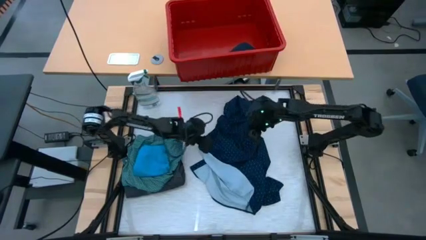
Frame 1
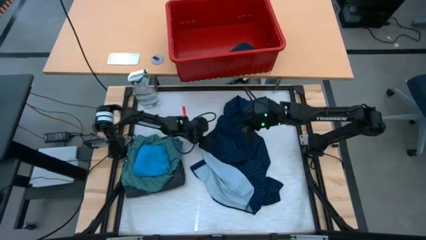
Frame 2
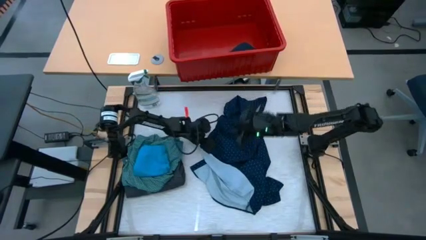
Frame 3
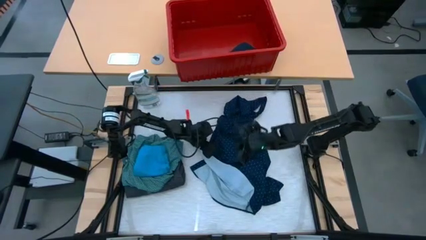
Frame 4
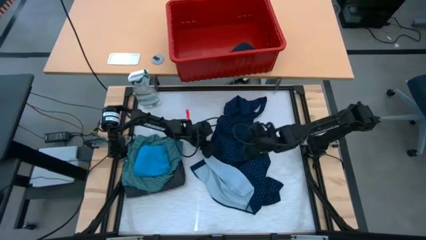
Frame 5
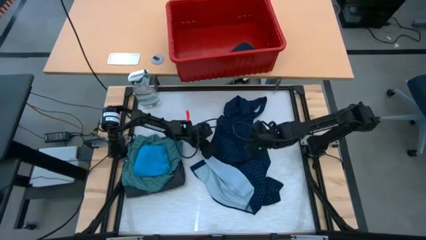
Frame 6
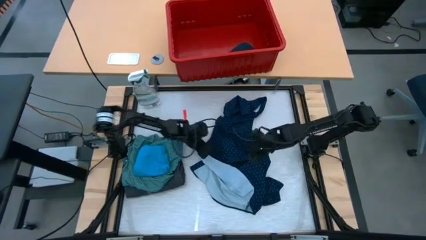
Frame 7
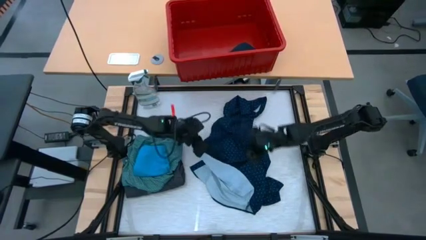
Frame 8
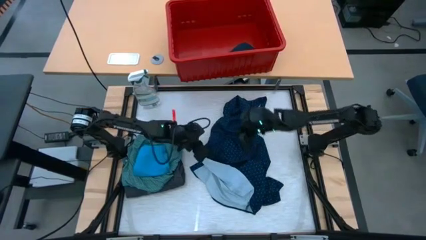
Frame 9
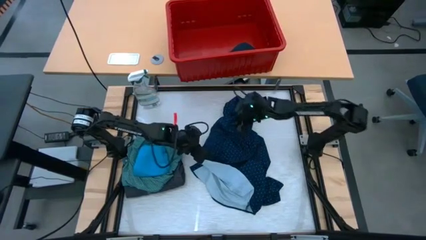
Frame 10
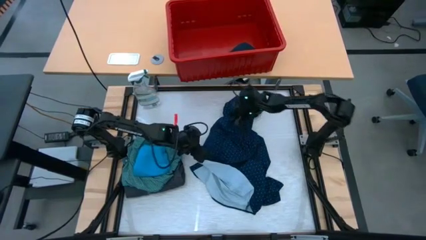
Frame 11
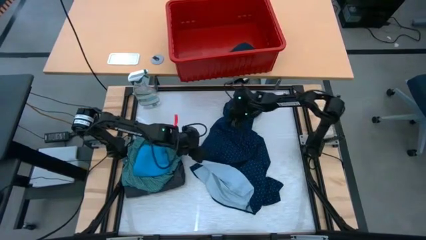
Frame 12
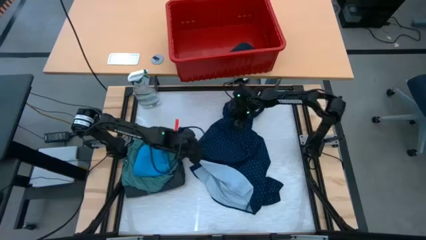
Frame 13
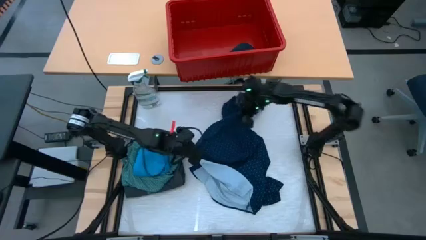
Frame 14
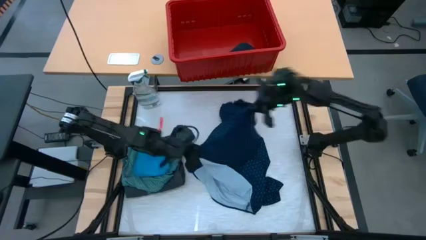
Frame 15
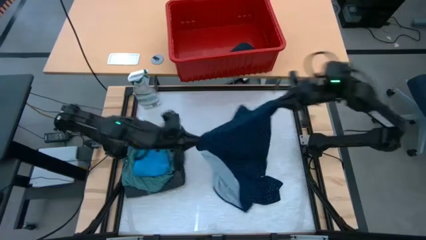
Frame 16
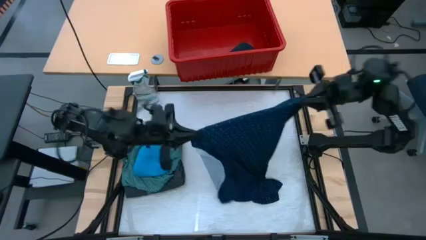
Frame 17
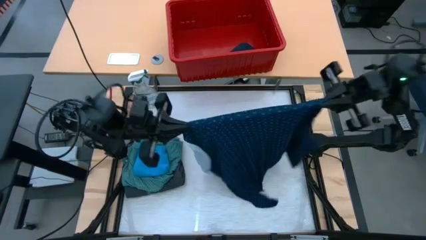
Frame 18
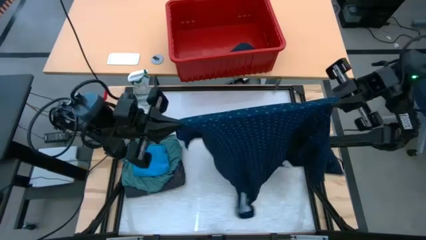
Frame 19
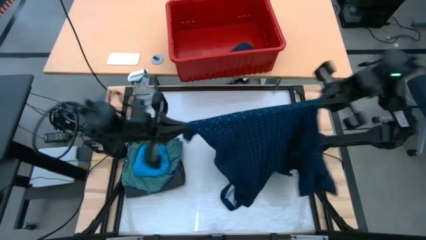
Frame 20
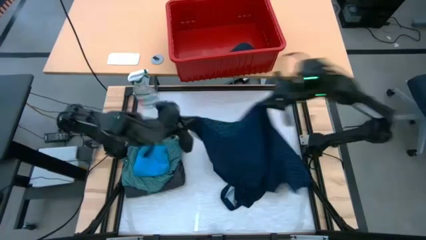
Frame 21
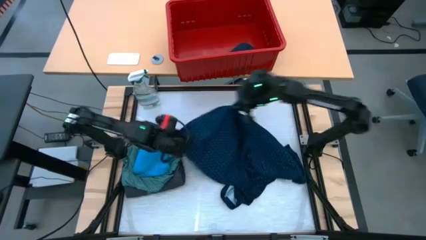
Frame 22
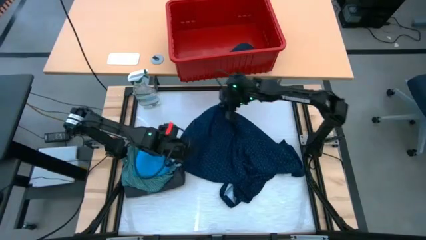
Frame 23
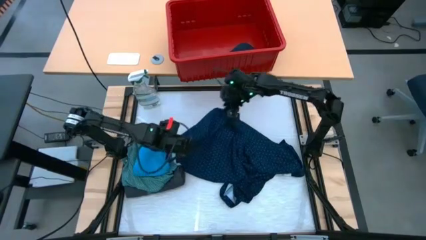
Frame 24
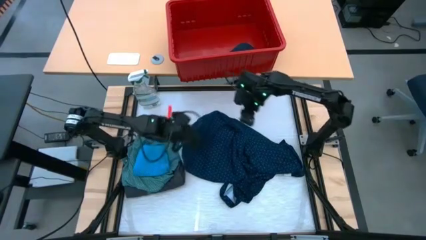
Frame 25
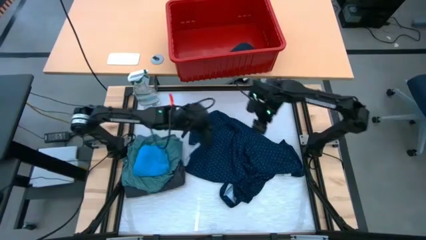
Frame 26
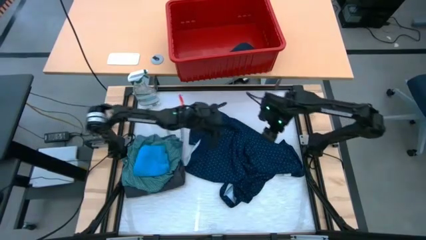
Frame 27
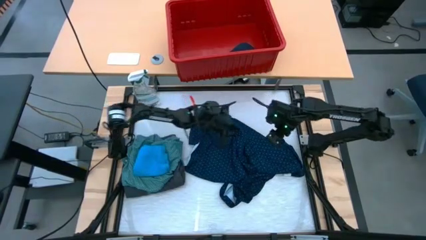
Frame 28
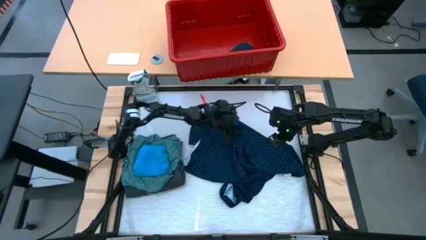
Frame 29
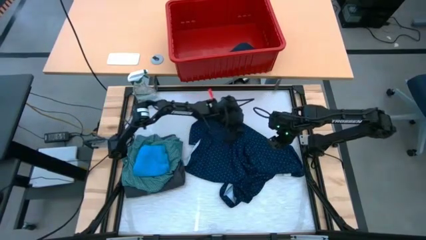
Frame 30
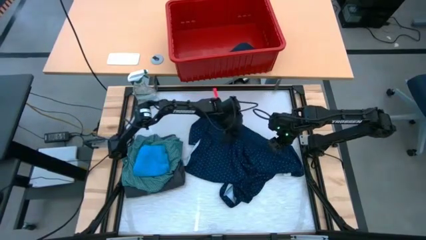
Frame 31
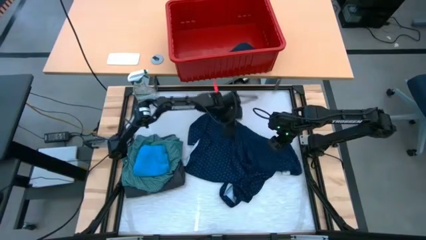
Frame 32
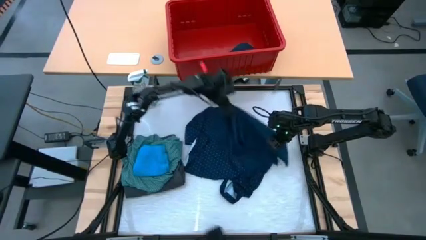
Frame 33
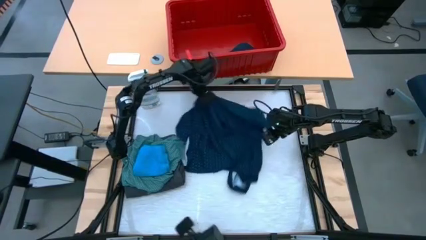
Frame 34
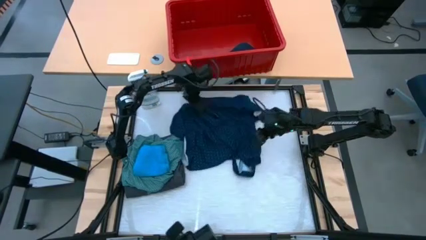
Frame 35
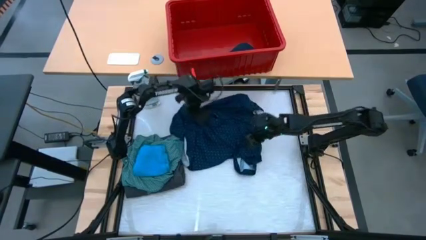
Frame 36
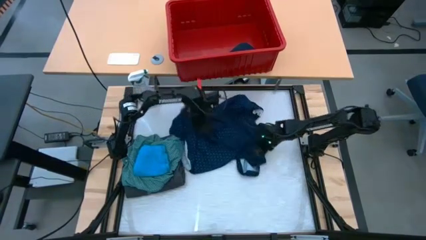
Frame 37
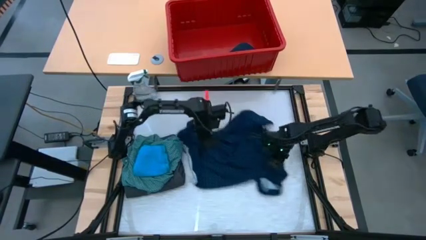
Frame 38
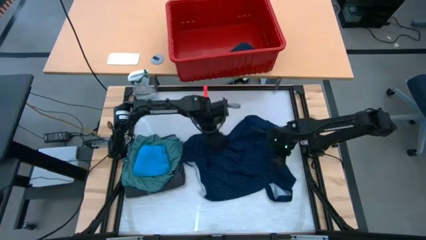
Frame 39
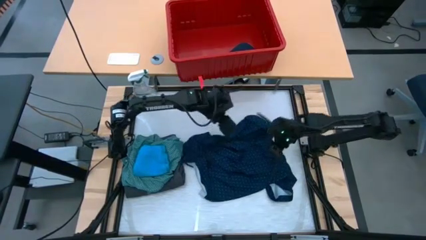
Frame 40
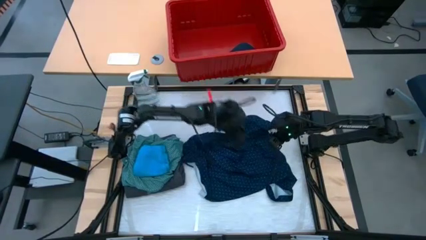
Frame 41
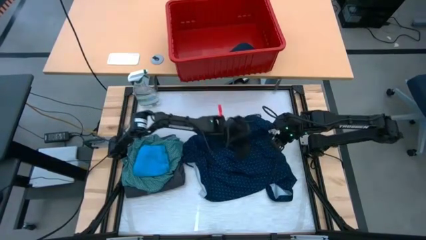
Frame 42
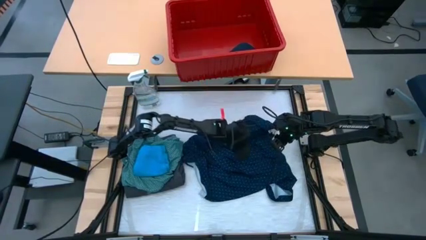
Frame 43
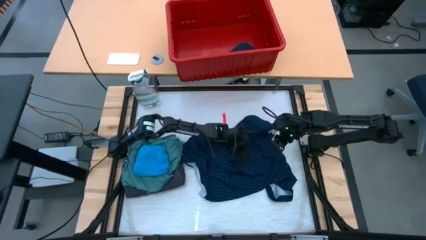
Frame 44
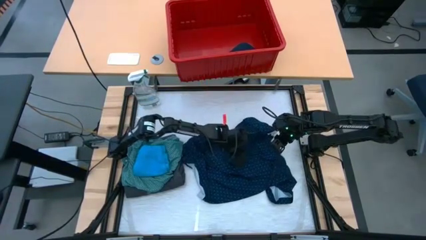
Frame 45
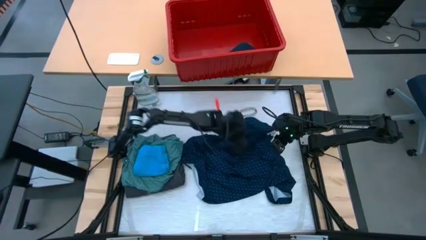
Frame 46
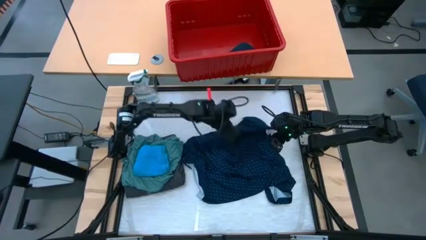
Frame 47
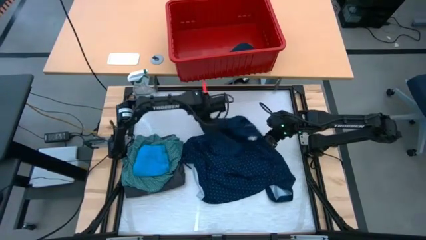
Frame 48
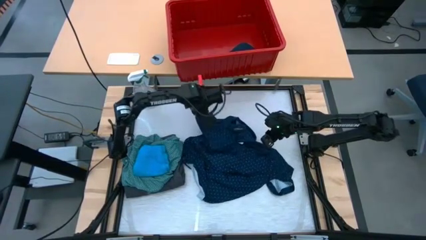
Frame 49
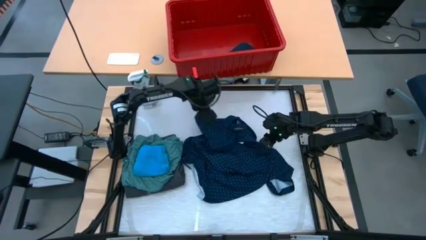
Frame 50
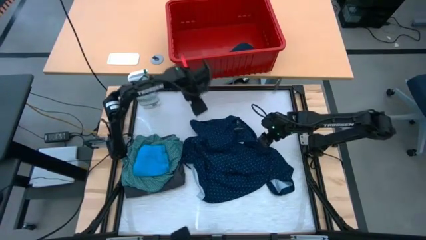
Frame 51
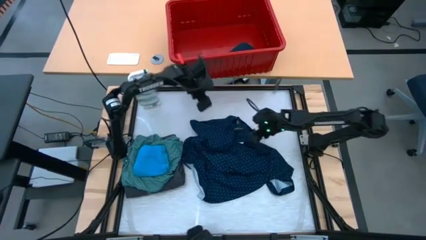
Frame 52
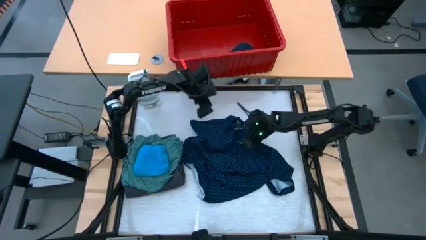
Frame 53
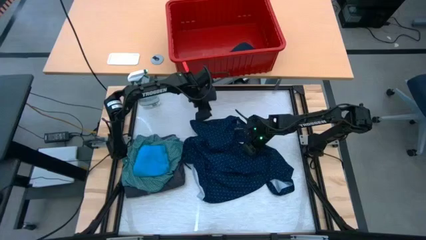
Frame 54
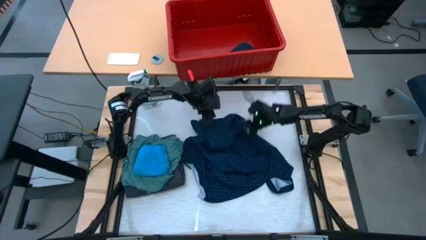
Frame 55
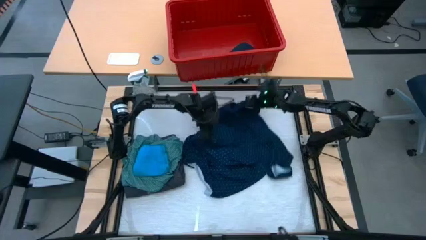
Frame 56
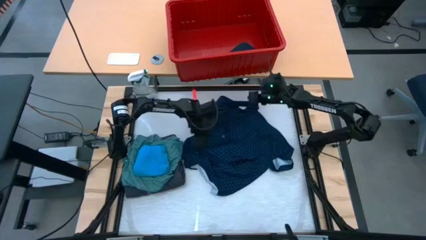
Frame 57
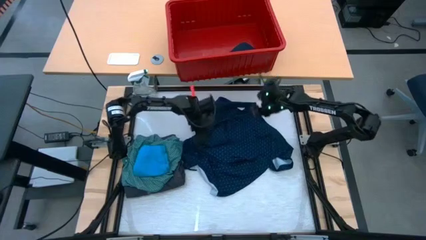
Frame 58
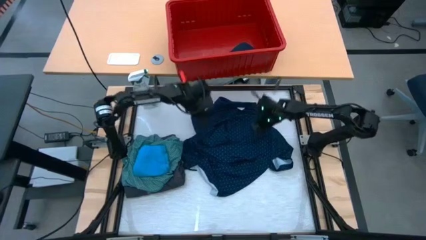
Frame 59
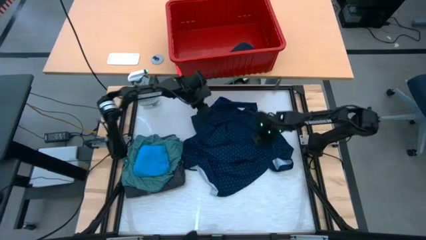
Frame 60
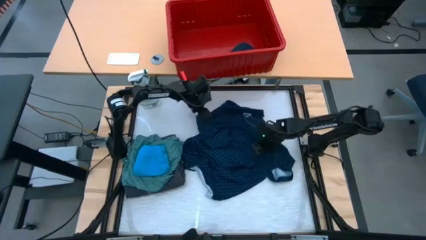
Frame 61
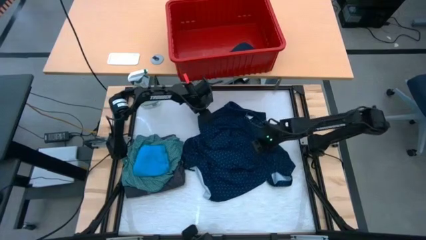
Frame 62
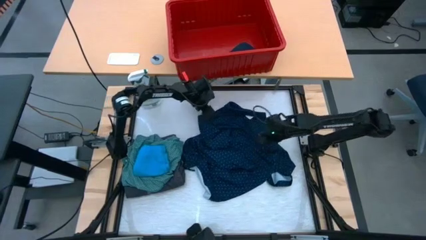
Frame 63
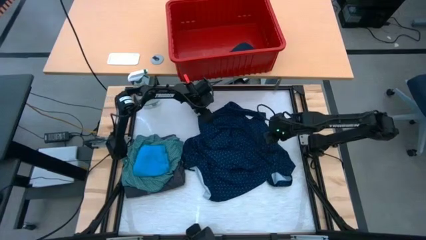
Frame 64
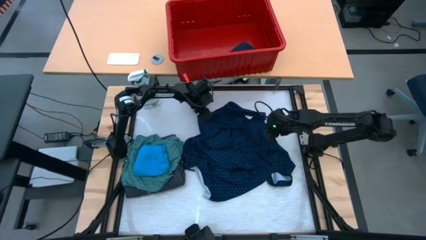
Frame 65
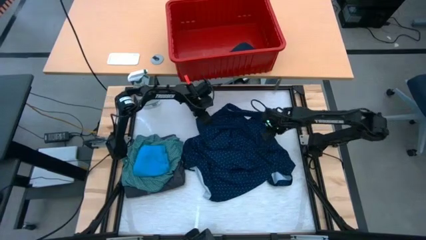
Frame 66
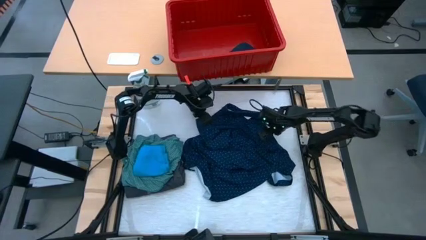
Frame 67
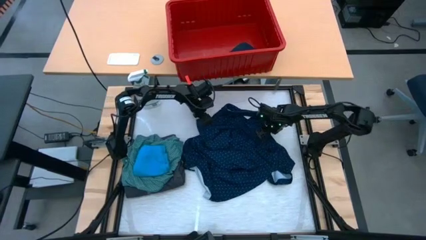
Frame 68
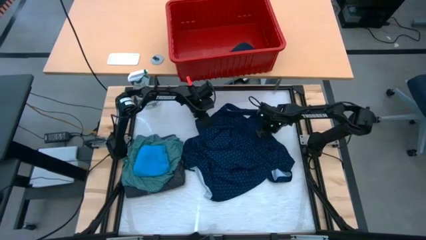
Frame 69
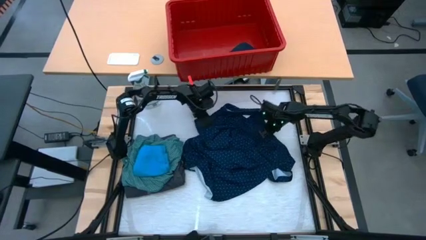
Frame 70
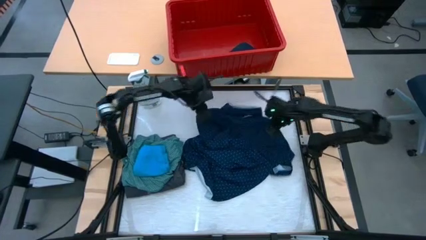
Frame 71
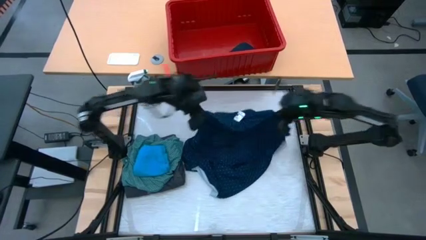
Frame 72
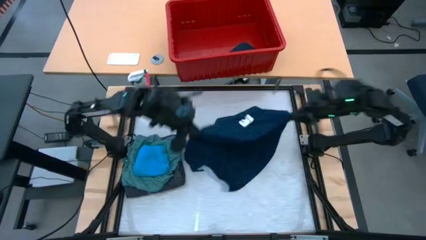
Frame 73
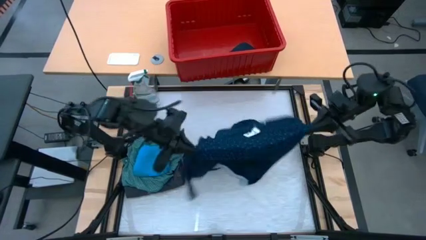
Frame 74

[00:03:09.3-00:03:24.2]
Task: Fold laundry
Fold the blue shirt
